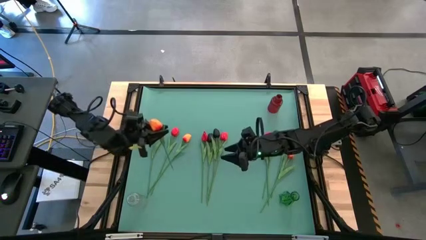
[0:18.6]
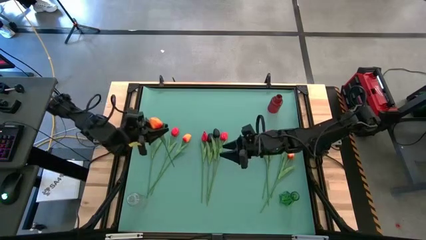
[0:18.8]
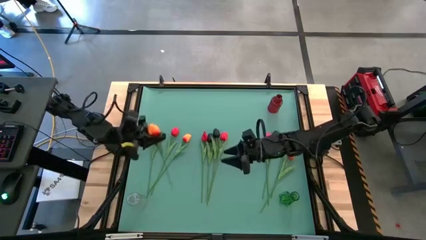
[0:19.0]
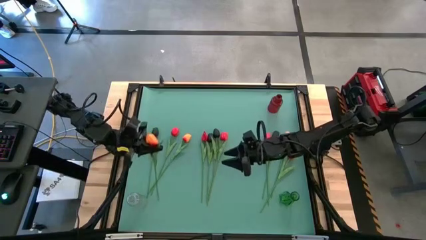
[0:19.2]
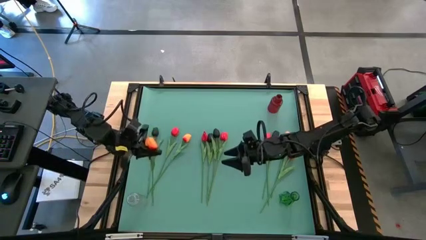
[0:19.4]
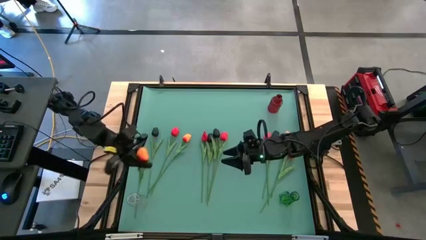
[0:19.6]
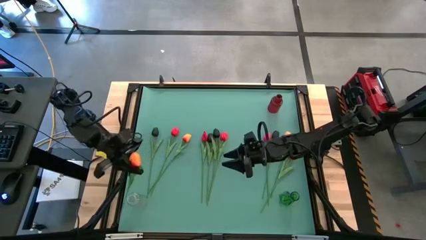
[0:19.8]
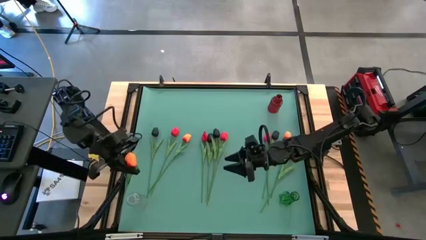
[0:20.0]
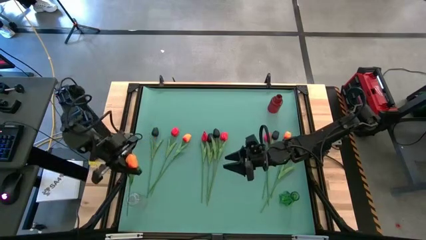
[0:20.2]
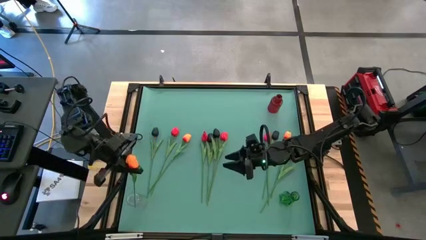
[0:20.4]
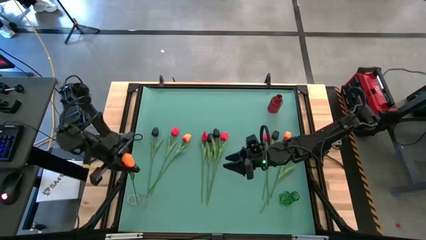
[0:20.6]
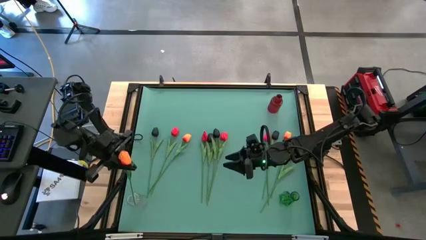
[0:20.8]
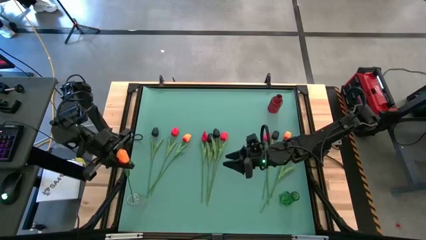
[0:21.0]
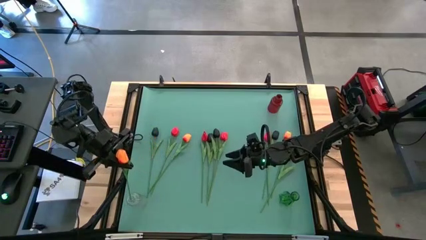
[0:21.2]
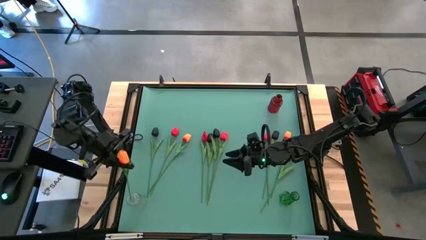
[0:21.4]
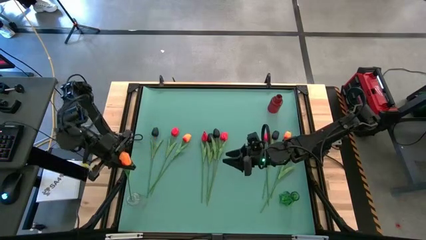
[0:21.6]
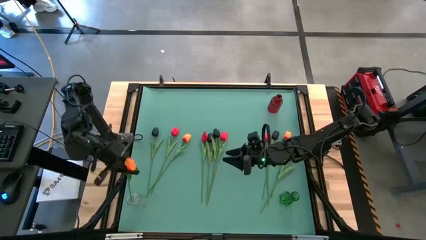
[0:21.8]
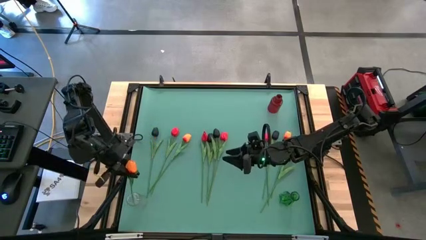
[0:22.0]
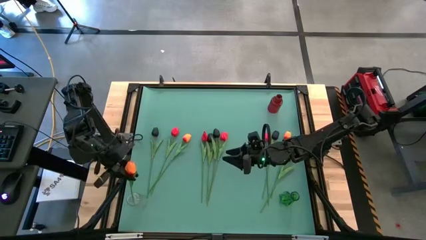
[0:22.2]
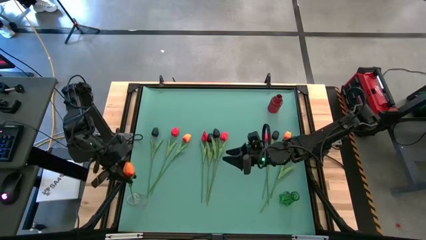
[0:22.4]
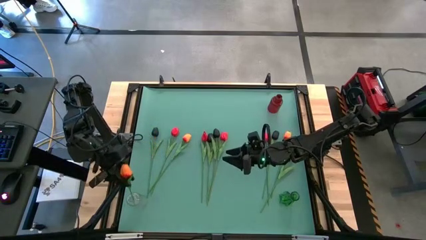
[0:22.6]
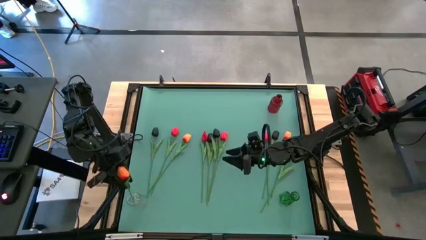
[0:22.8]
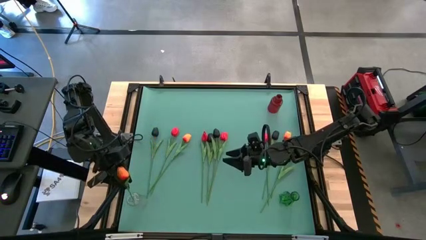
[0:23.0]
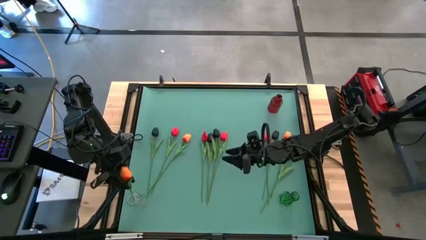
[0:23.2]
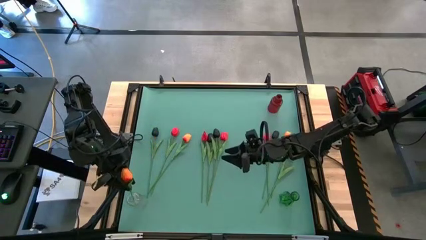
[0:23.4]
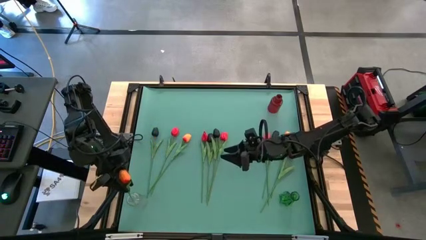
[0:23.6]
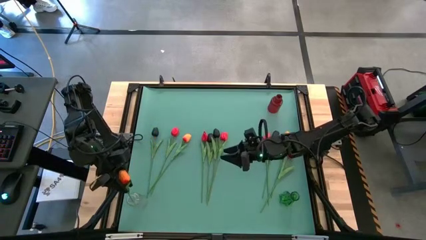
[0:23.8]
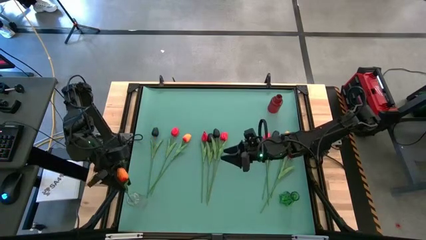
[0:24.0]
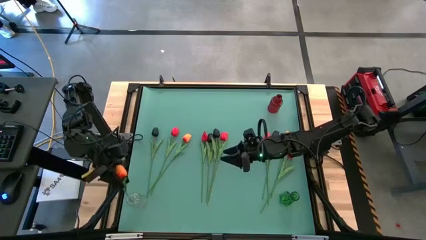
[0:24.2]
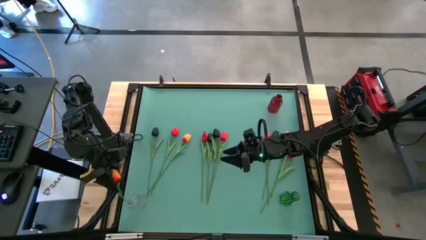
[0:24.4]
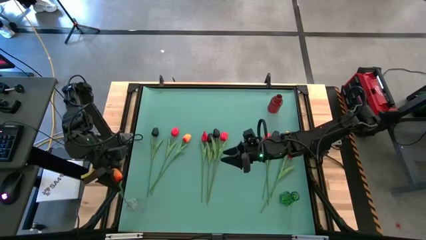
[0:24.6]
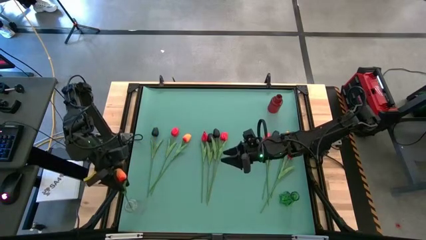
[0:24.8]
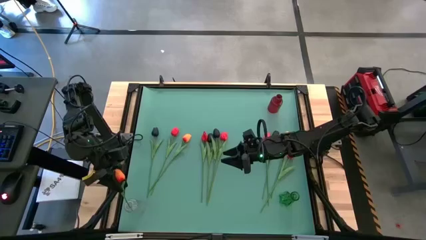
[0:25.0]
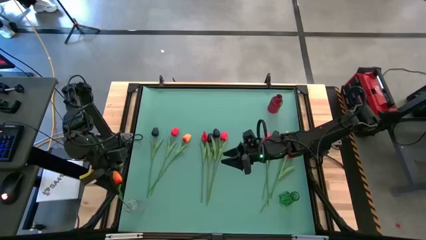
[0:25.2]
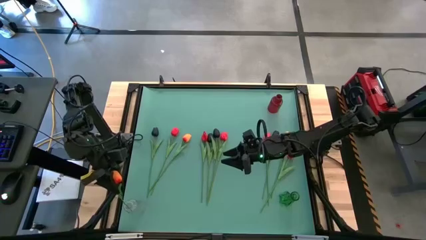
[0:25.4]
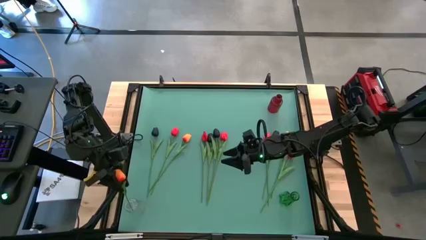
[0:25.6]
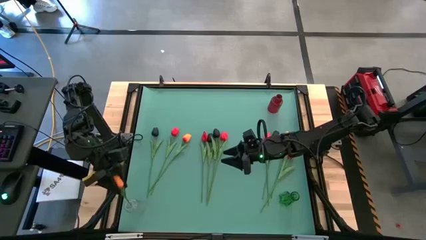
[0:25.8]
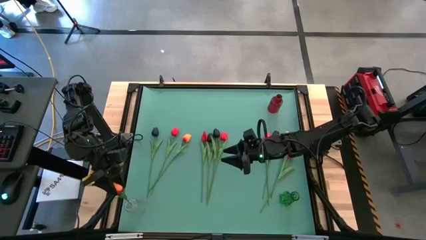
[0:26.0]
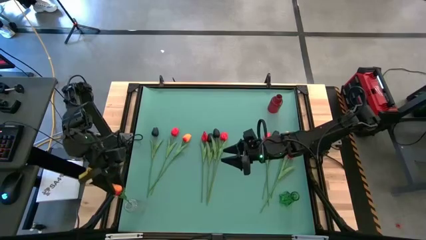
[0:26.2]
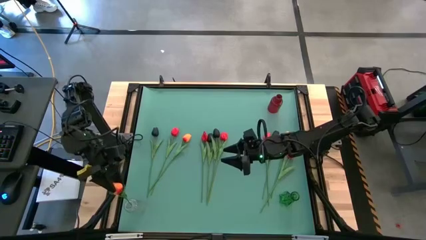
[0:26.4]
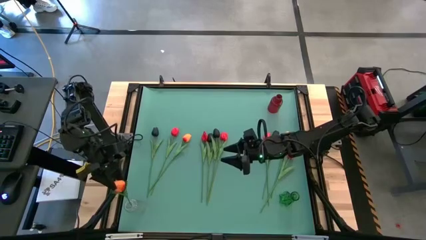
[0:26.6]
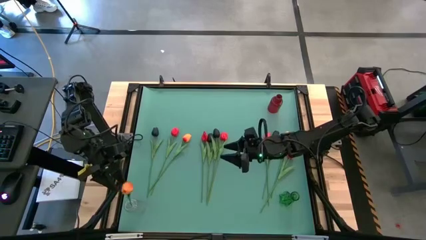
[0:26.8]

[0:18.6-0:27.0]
Task: Sort flowers into vase by color
Put the orange tulip into the transparent vase

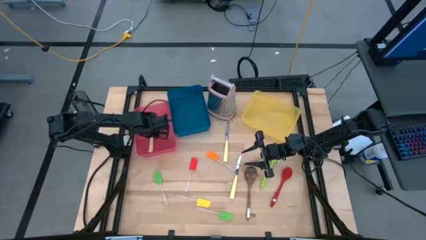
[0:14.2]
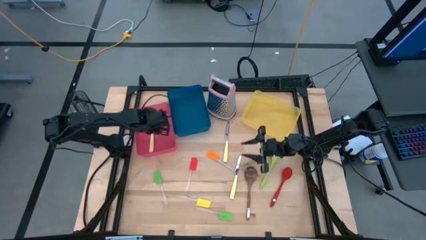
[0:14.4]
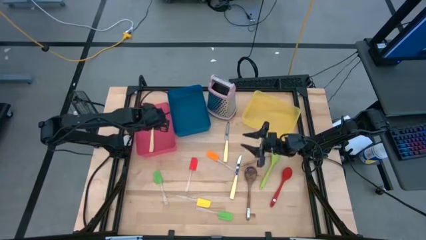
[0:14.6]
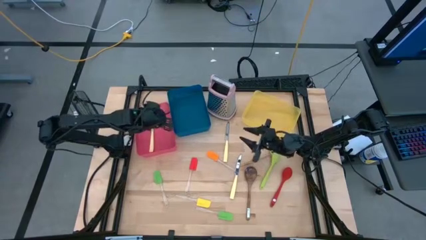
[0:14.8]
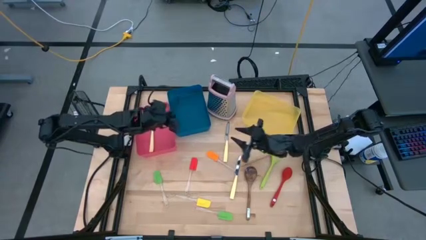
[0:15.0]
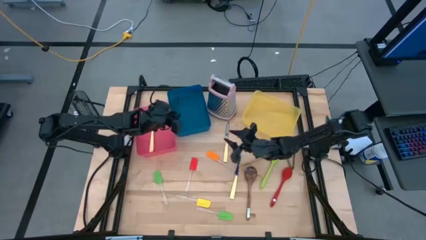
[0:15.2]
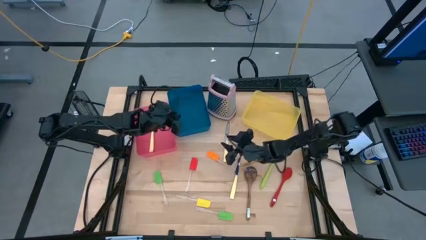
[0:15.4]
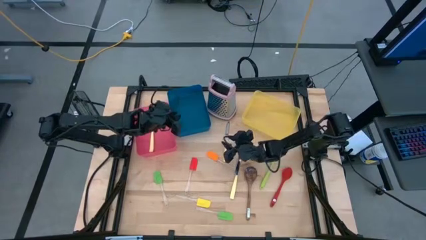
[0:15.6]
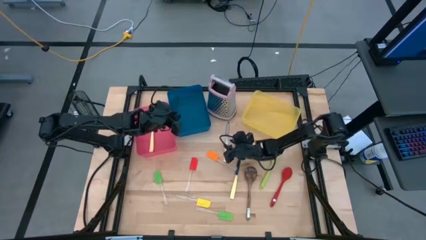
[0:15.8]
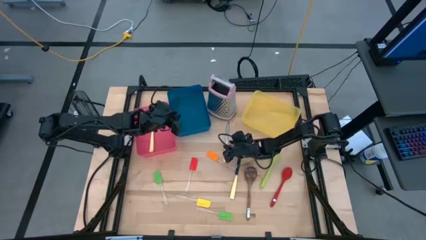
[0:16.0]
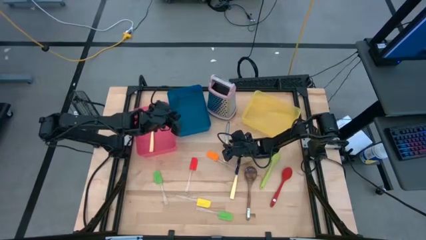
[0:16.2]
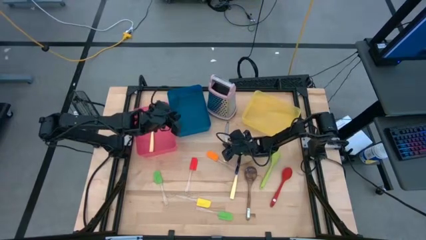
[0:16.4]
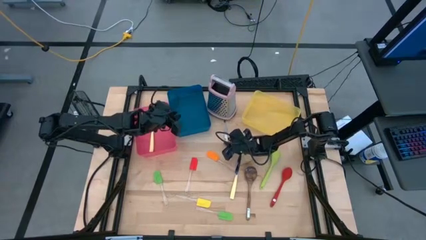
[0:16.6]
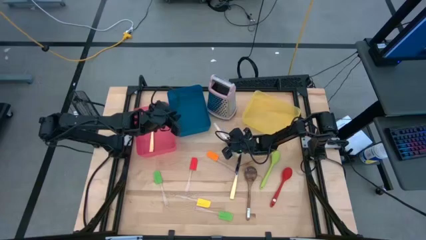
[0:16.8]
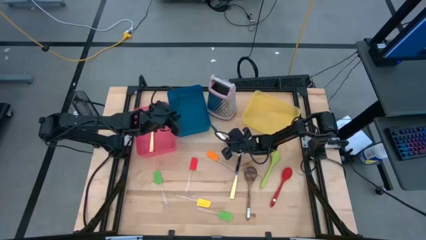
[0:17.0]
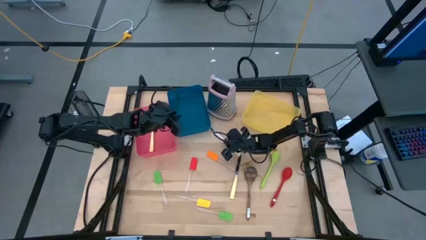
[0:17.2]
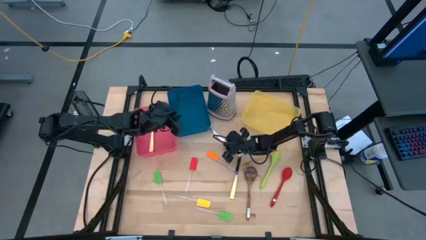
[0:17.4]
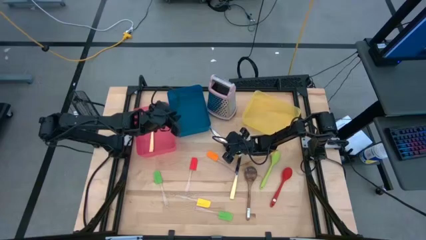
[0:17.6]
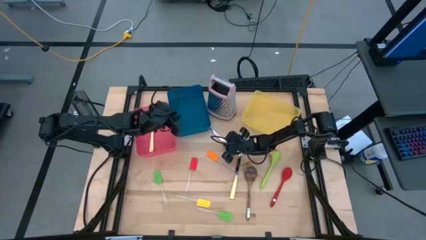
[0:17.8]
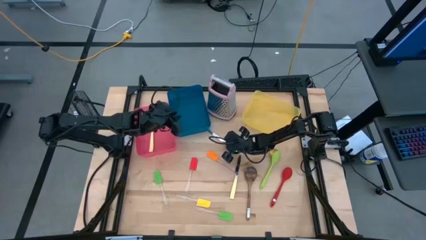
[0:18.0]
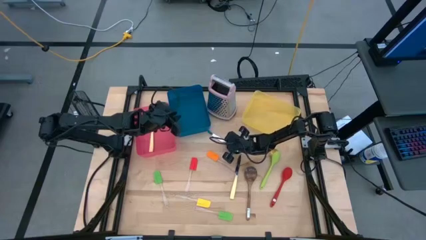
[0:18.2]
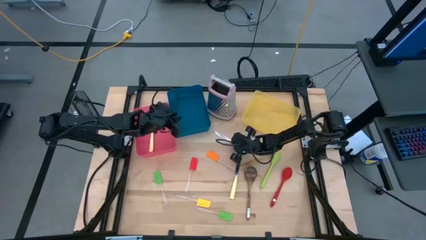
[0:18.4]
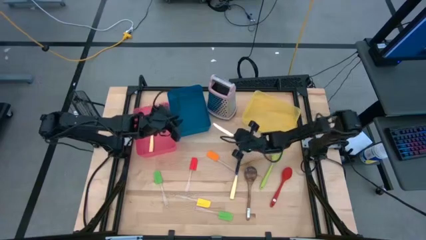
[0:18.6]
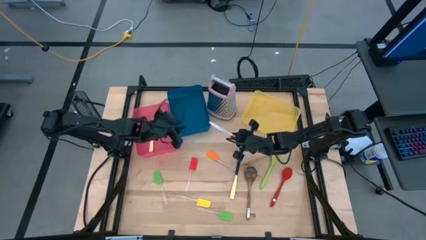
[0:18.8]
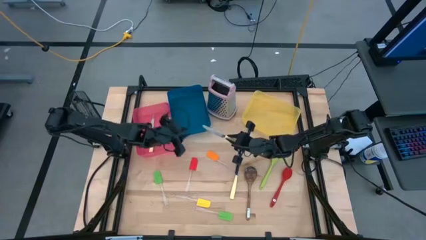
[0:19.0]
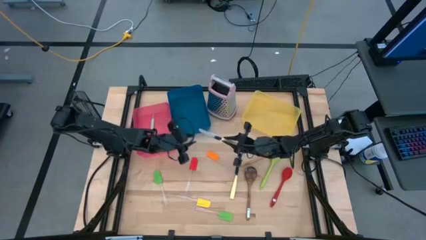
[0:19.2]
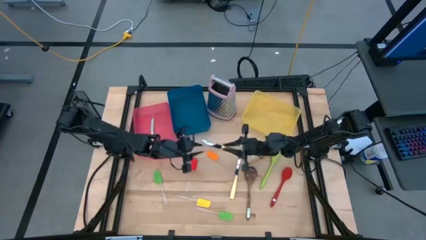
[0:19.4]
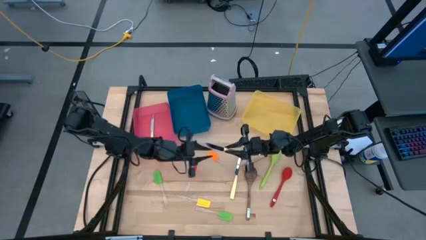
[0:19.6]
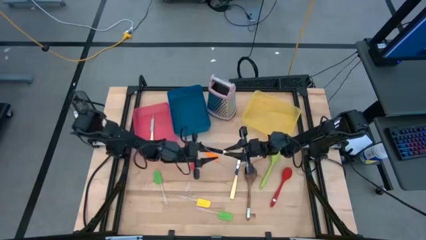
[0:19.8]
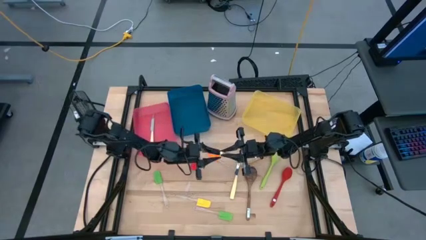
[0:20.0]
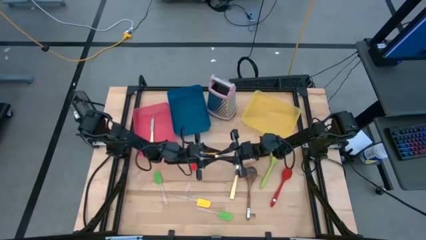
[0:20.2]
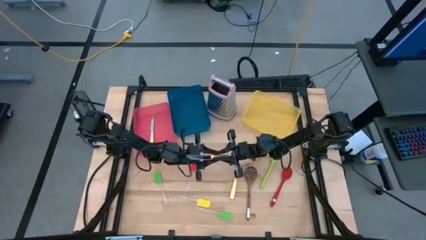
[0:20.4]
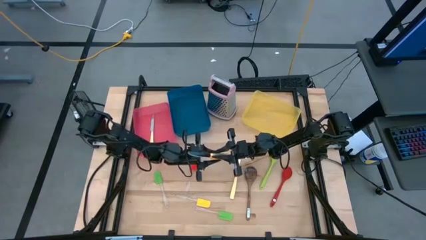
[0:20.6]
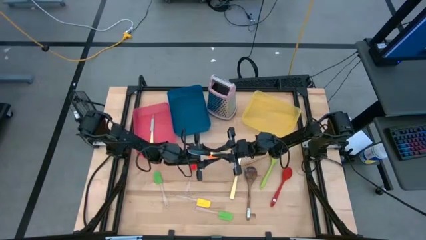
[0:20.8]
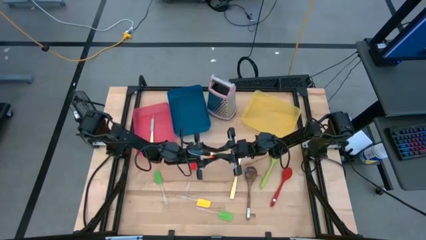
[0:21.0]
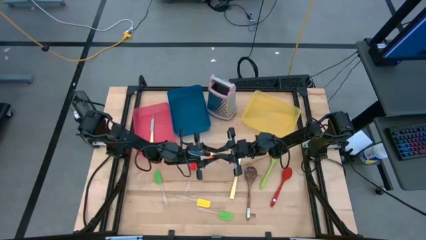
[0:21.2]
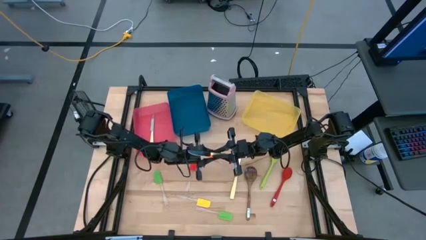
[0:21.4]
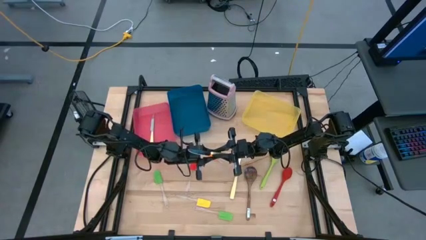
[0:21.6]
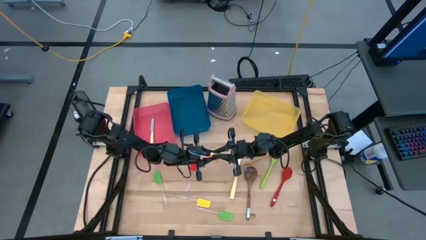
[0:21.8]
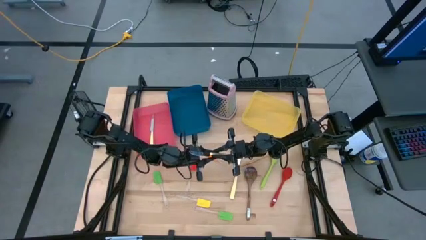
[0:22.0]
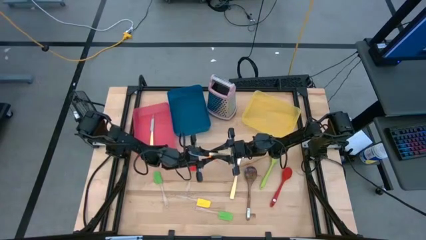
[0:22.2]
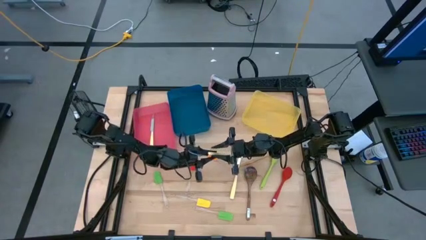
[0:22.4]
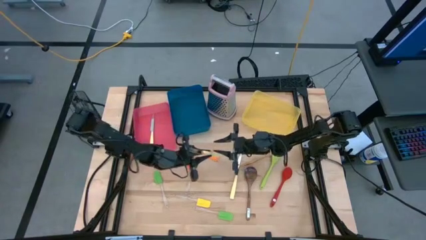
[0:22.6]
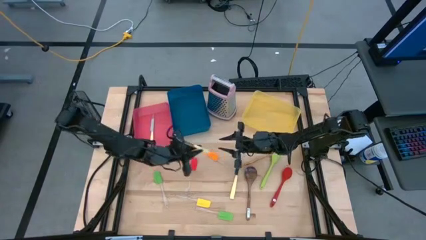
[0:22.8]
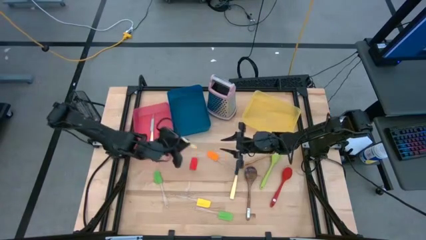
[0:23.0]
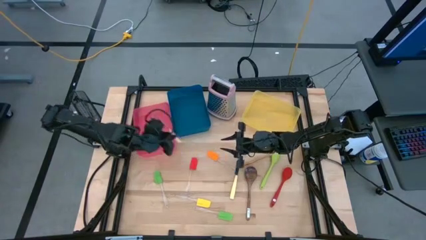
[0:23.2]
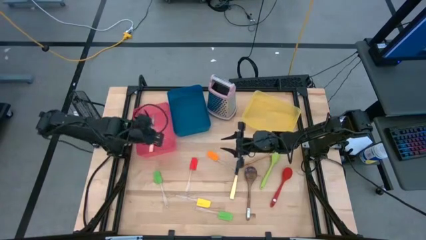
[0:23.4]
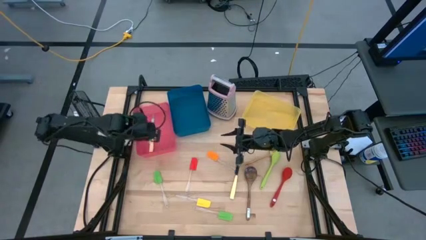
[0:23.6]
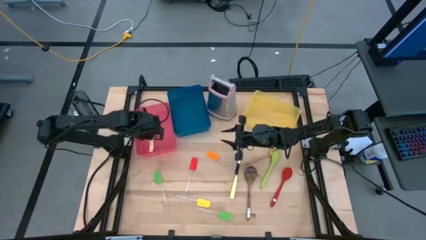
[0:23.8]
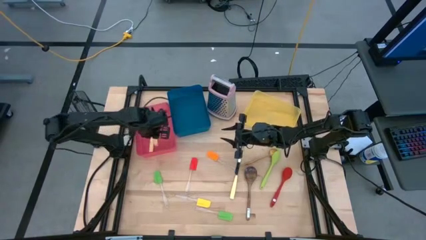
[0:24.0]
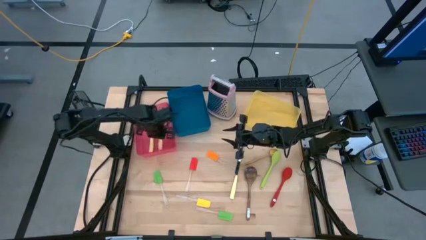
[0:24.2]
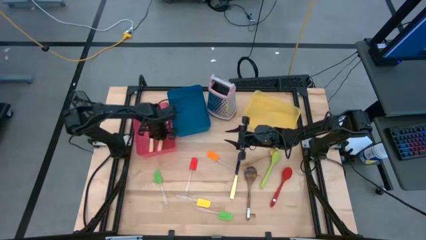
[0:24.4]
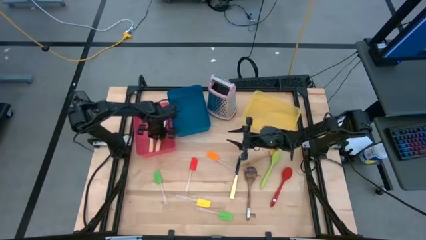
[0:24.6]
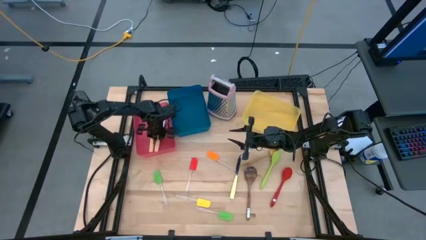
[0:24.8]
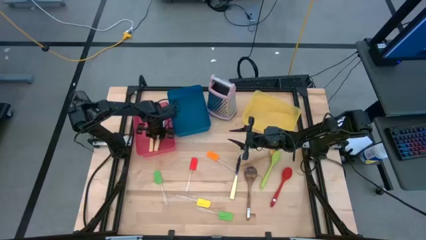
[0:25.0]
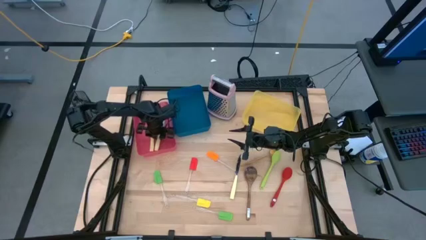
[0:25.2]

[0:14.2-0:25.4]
Task: Pick & Place Kitchen Items
Put the top yellow knife into the pink bin
